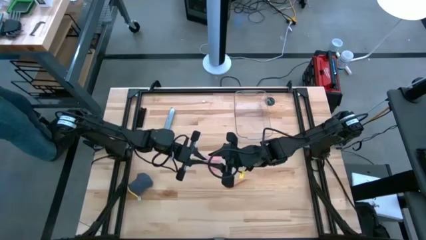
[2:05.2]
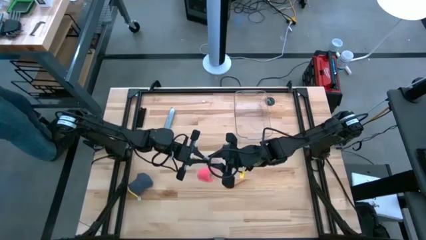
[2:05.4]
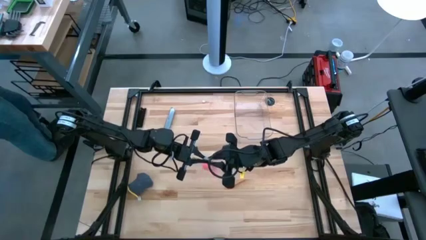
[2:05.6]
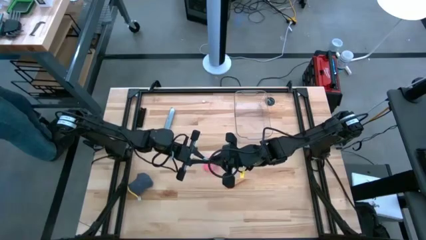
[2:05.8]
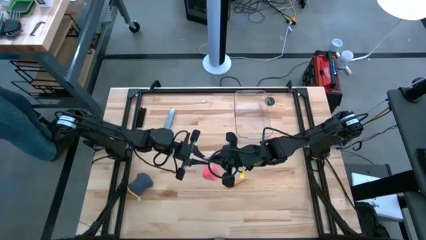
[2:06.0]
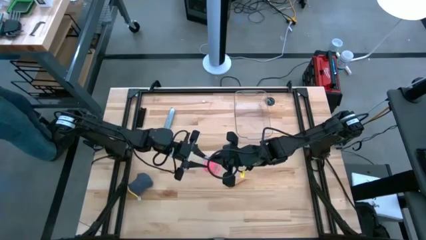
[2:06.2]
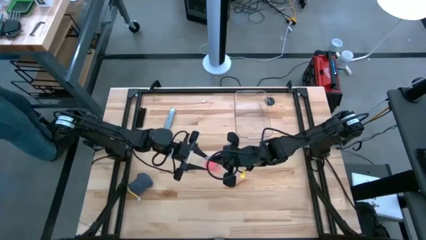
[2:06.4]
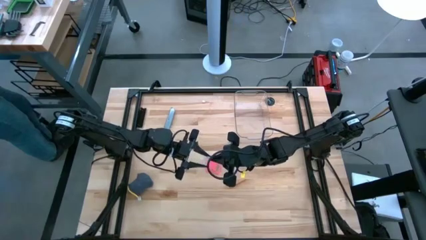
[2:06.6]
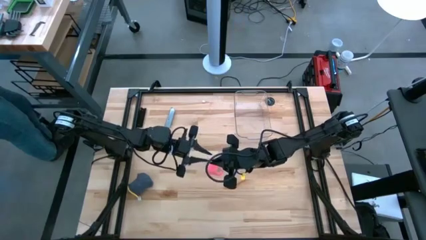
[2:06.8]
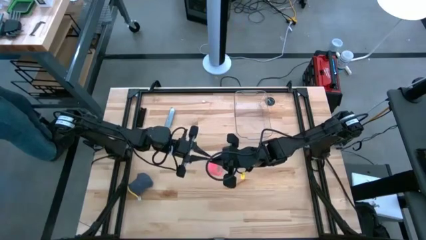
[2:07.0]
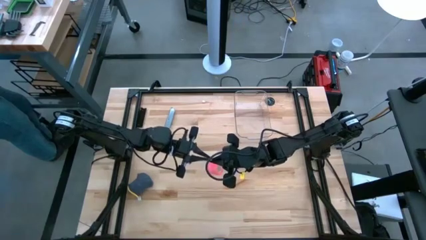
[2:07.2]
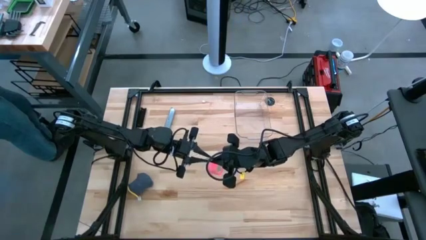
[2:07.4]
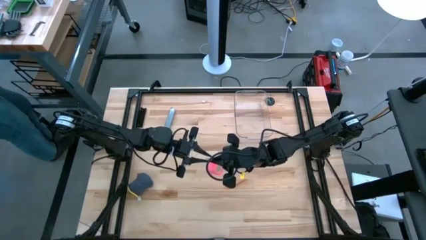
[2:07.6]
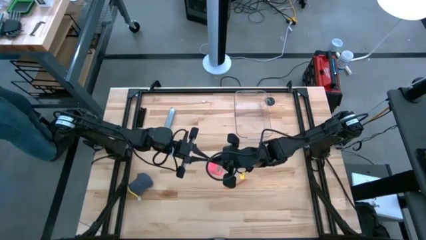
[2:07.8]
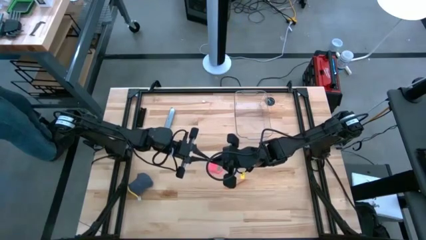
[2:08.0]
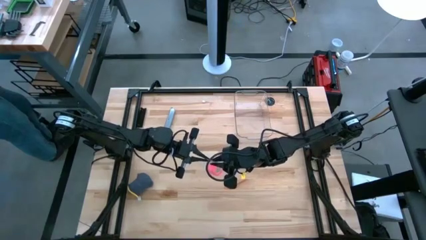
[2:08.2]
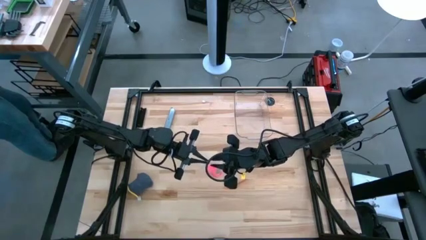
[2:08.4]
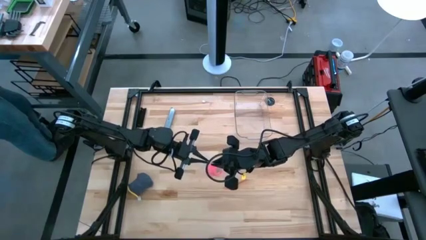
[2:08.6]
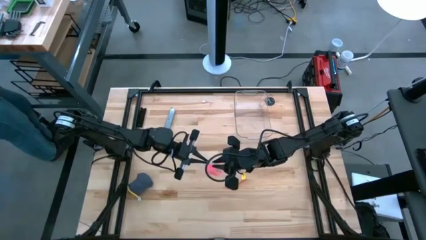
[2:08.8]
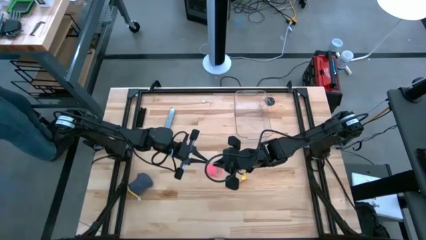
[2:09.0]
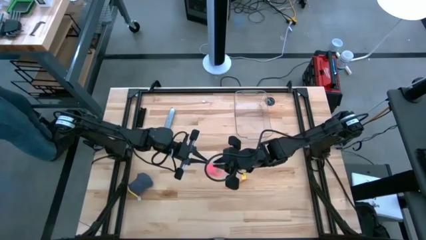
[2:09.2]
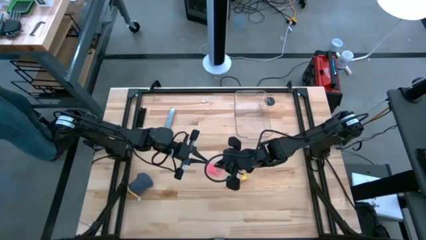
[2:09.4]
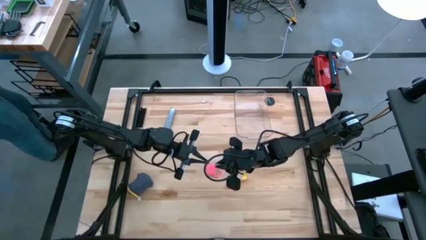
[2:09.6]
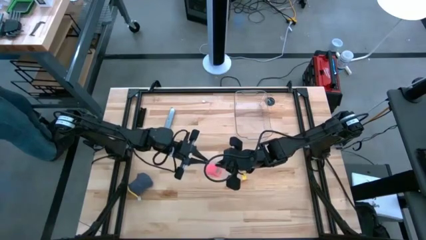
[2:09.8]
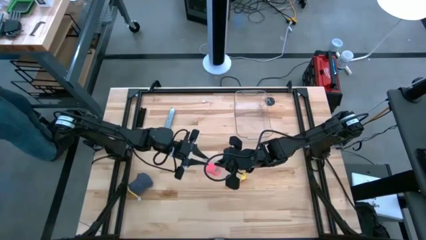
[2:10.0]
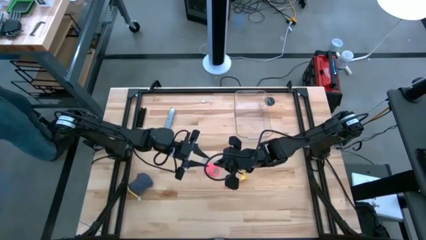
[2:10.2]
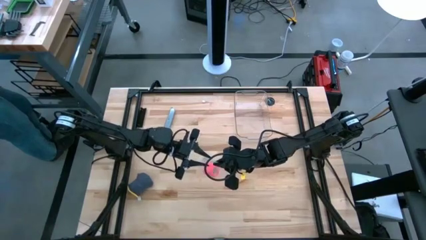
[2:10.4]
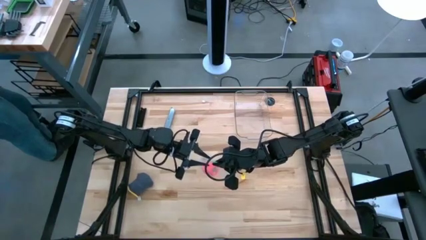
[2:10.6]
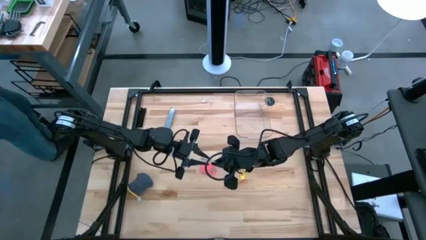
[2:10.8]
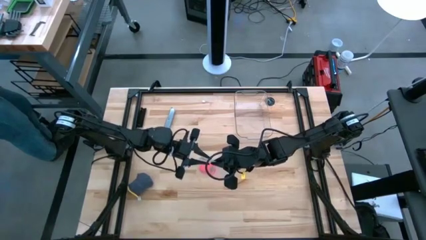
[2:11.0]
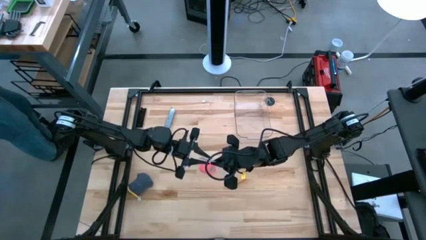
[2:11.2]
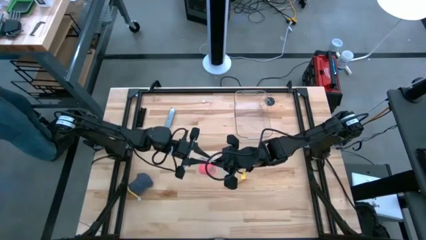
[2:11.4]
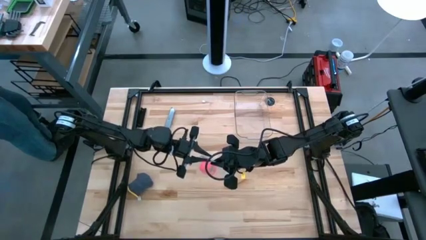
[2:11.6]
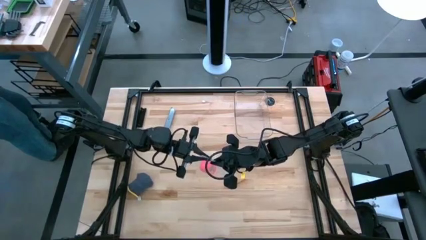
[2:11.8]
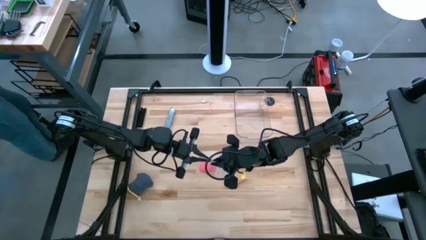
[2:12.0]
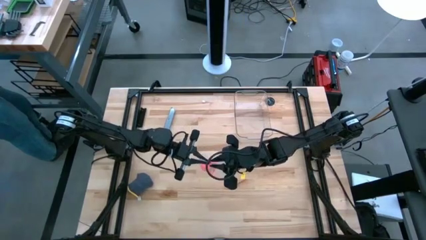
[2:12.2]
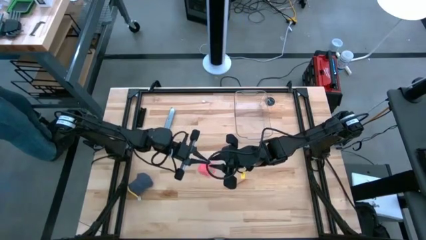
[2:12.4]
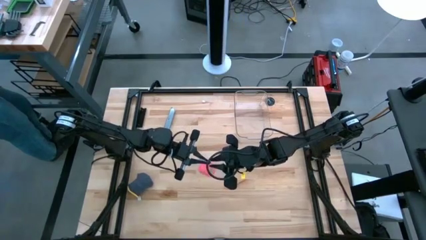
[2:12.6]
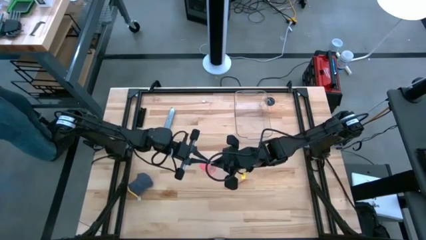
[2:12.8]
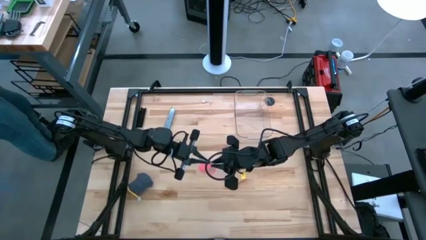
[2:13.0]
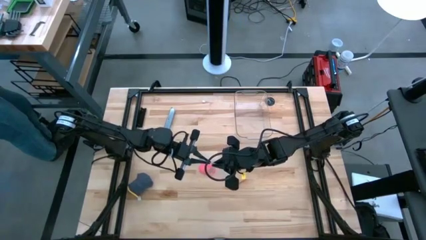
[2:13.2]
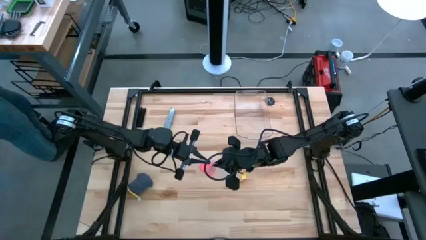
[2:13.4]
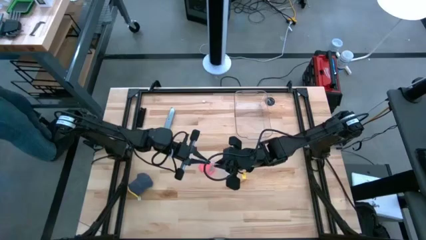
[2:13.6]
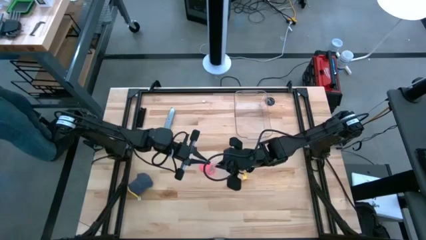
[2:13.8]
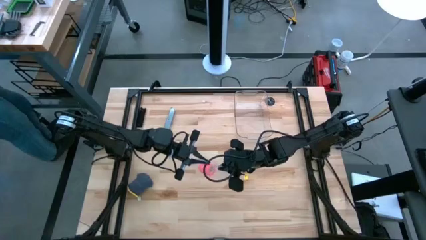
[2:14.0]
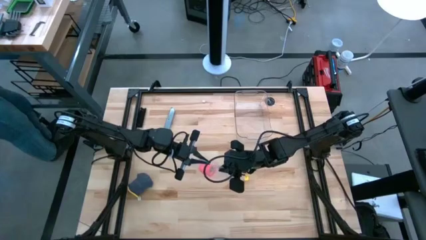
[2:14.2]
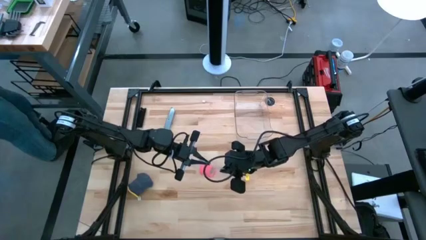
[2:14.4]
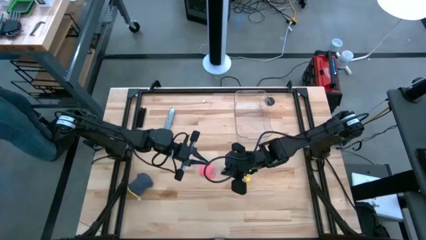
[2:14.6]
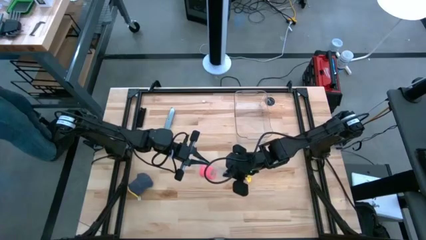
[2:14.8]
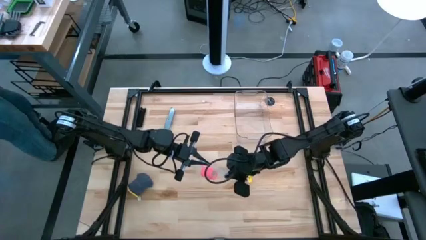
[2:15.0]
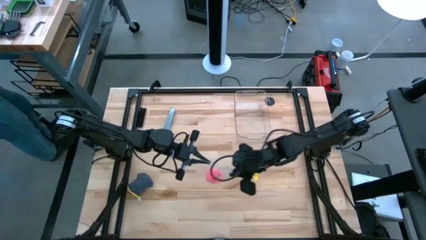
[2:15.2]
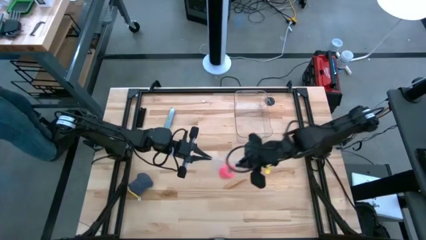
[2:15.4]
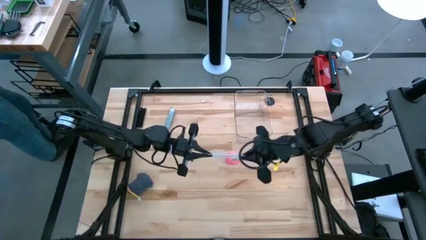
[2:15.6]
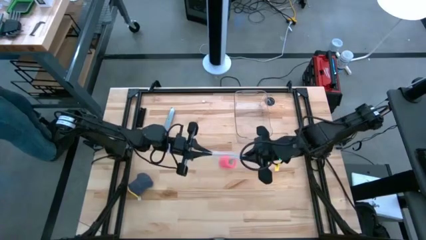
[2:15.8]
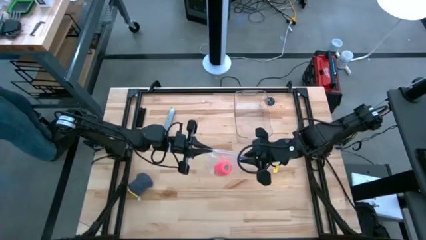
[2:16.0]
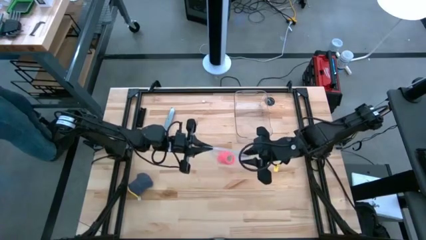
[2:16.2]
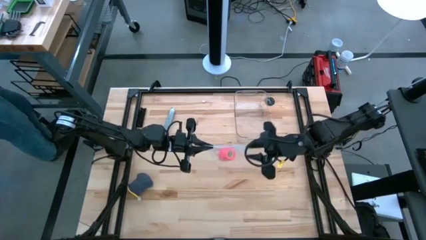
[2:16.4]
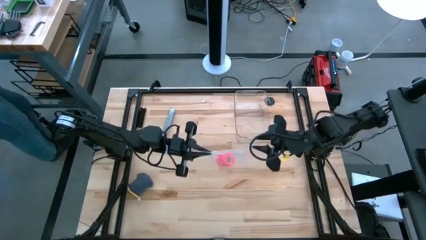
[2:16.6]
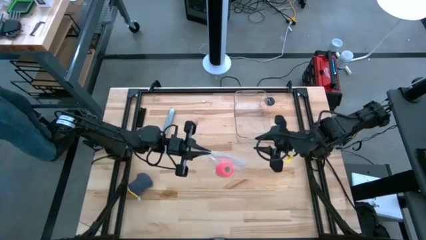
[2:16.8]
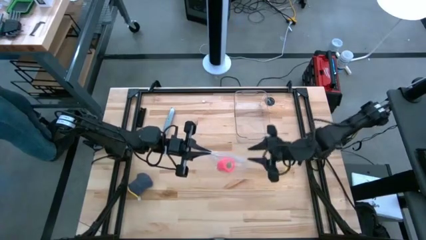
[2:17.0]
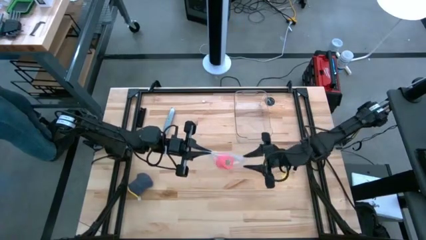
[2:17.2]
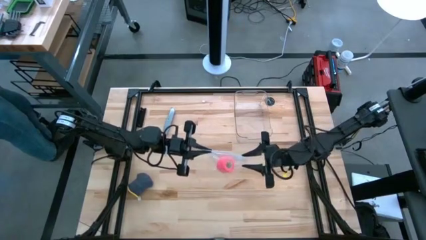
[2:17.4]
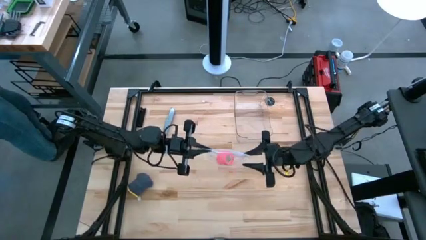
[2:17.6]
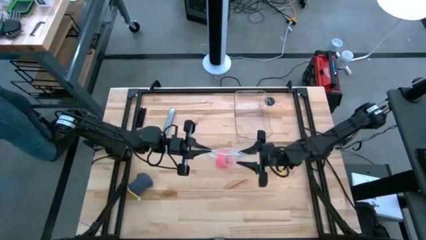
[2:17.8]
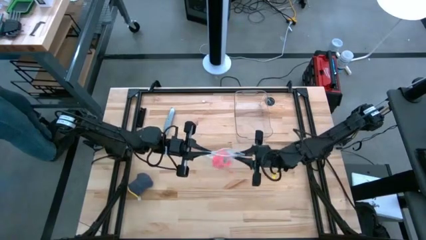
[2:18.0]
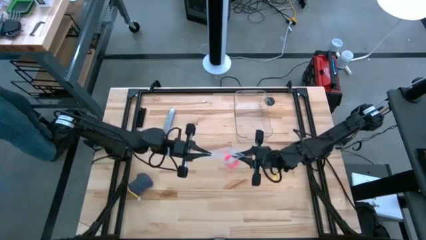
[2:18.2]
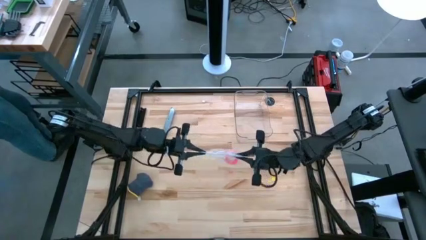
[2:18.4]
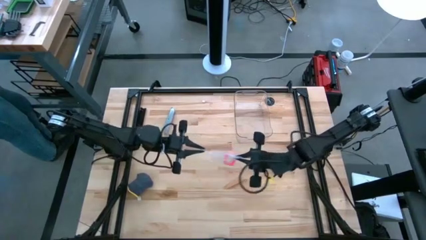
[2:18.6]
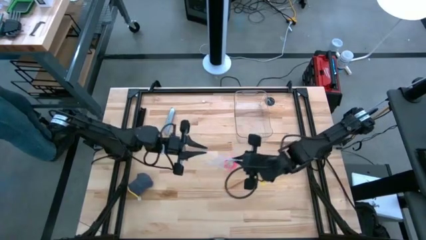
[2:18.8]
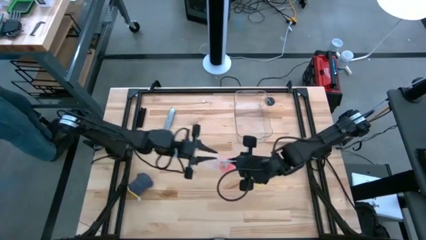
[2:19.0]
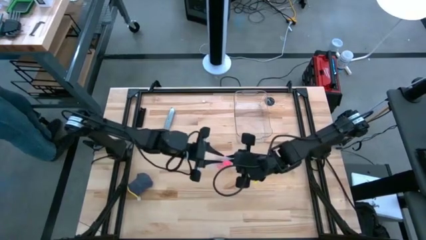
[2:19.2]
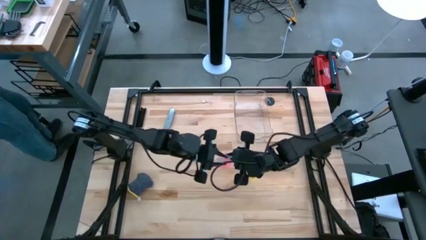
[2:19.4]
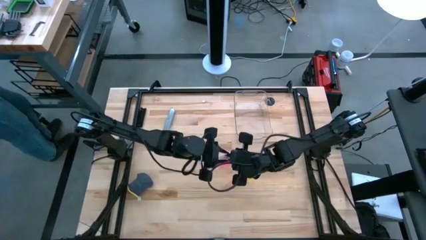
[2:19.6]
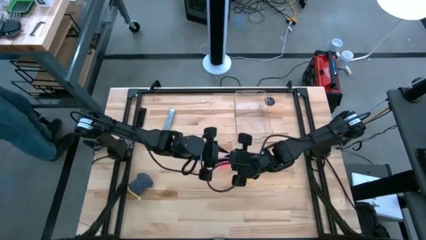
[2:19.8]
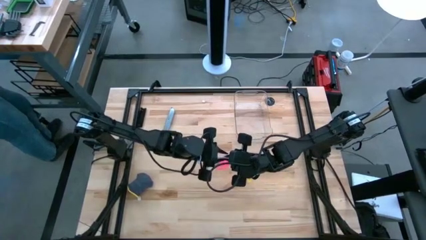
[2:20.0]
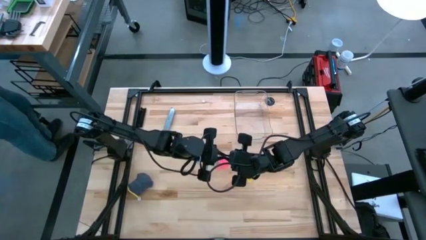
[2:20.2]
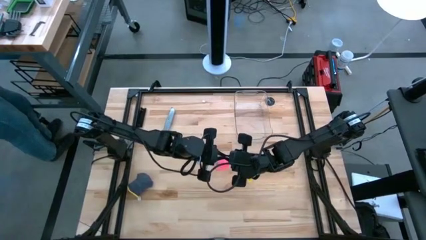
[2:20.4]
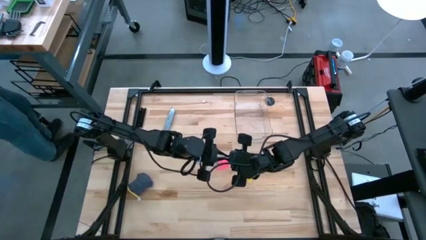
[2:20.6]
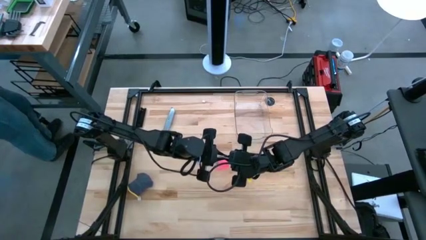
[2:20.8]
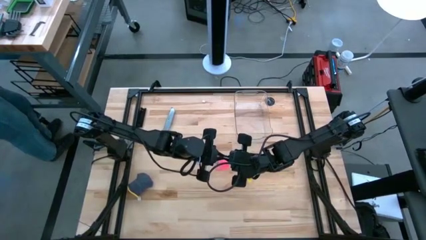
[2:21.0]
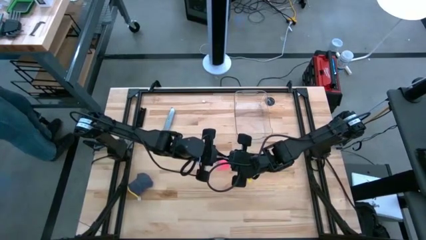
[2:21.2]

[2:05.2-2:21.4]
Task: Roll bandage
Close the transparent zip bag
